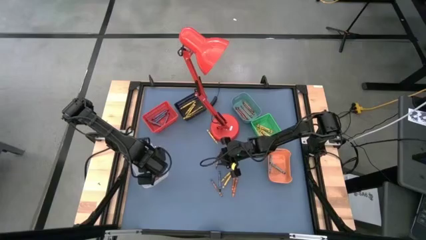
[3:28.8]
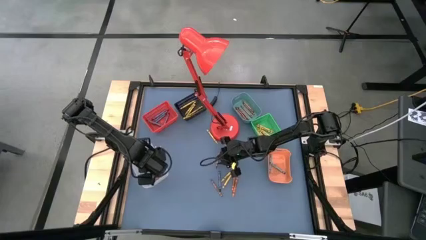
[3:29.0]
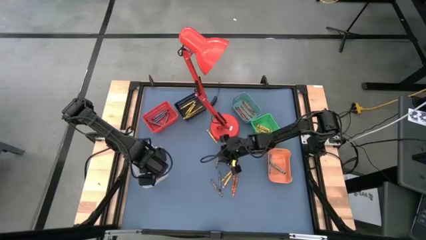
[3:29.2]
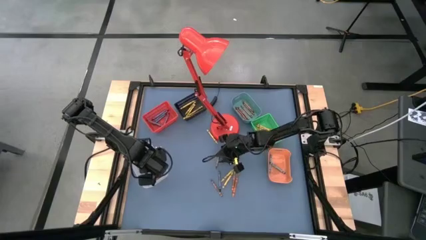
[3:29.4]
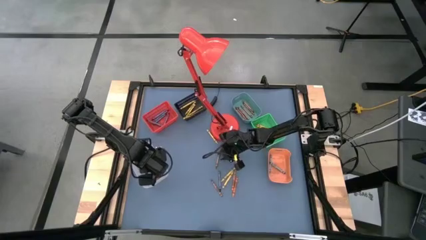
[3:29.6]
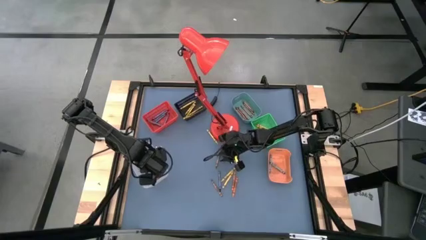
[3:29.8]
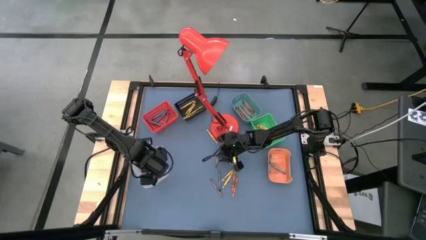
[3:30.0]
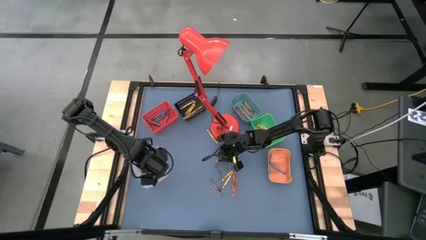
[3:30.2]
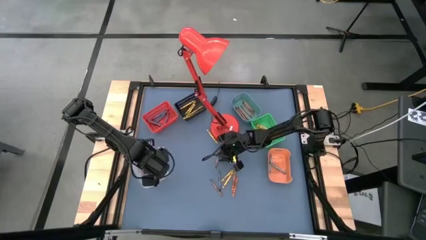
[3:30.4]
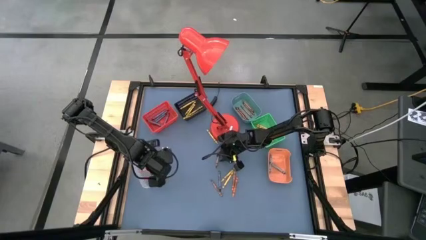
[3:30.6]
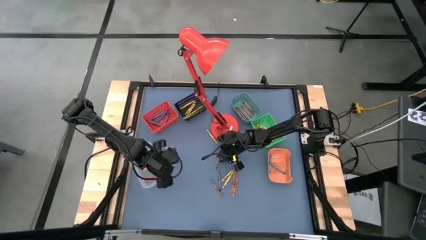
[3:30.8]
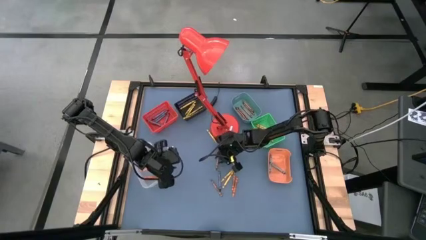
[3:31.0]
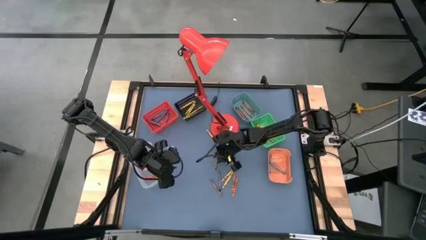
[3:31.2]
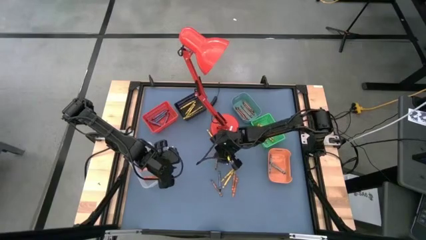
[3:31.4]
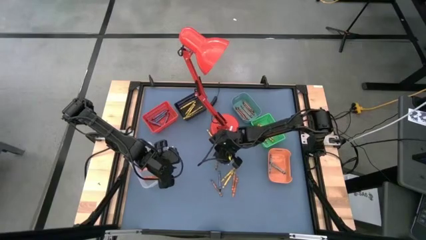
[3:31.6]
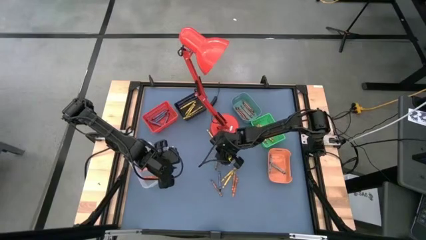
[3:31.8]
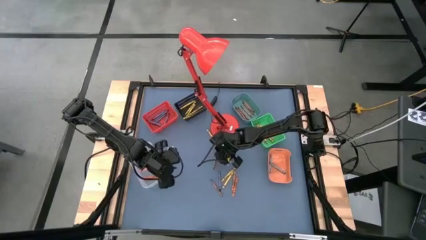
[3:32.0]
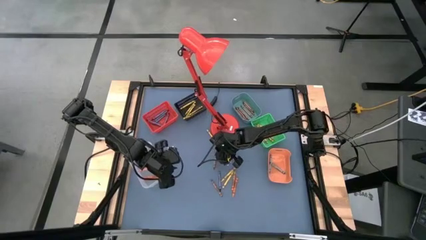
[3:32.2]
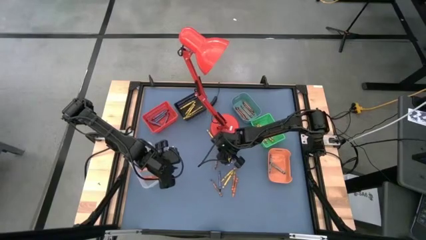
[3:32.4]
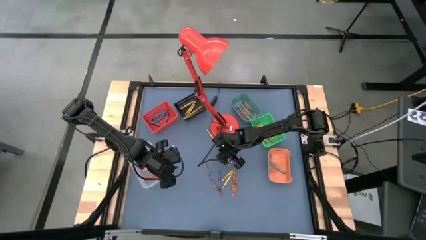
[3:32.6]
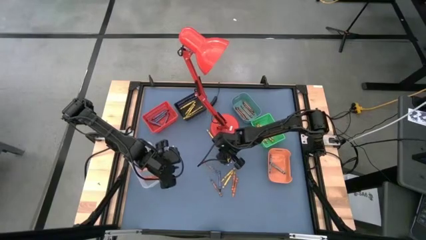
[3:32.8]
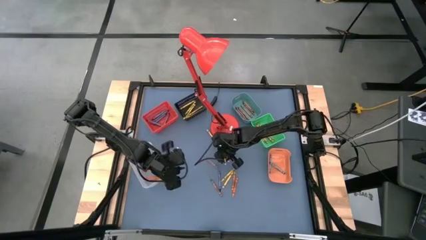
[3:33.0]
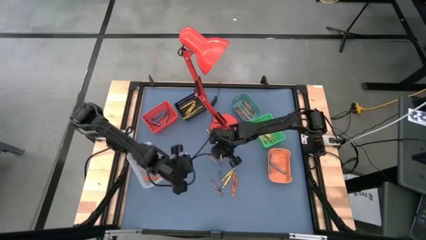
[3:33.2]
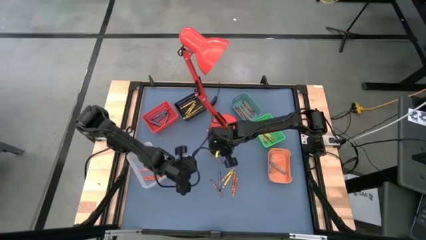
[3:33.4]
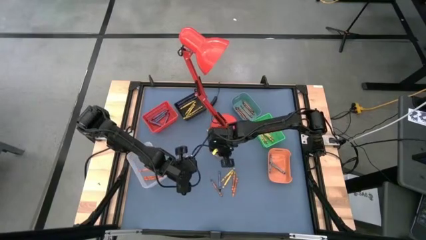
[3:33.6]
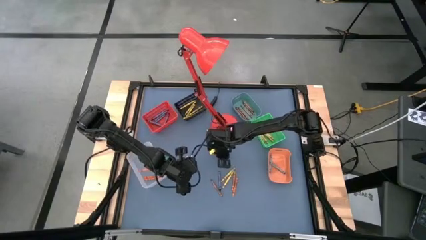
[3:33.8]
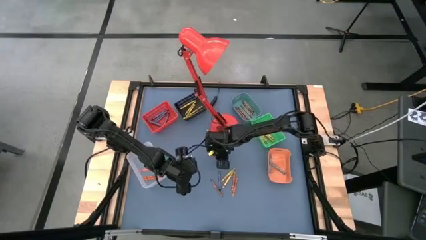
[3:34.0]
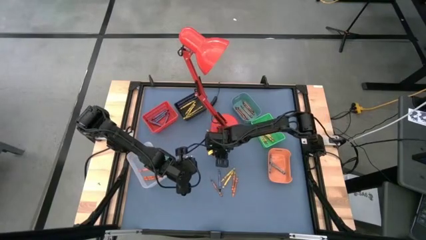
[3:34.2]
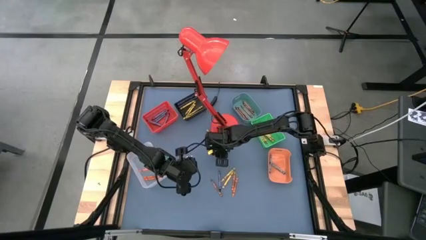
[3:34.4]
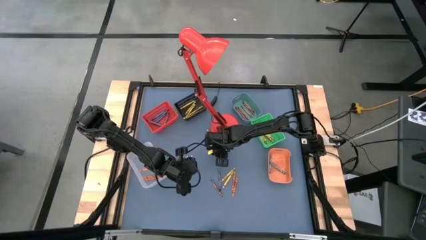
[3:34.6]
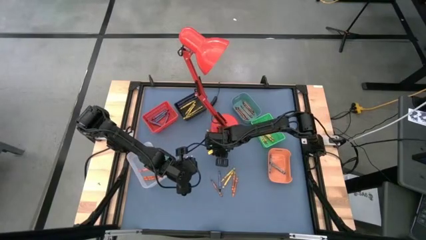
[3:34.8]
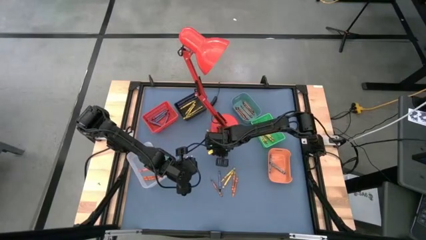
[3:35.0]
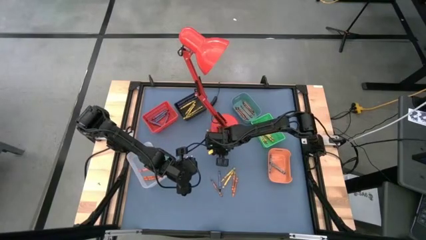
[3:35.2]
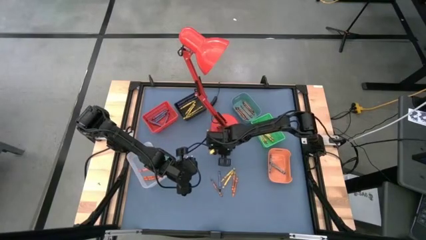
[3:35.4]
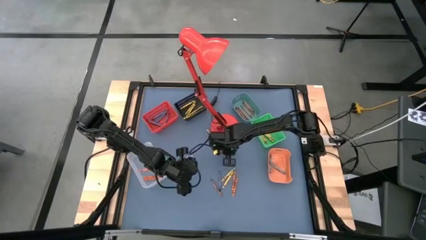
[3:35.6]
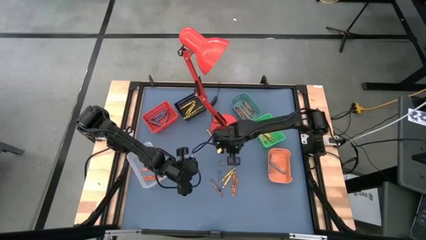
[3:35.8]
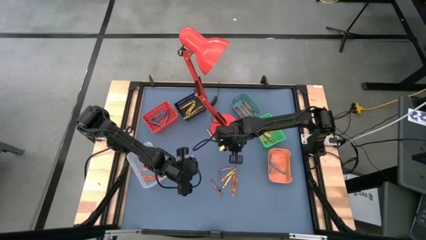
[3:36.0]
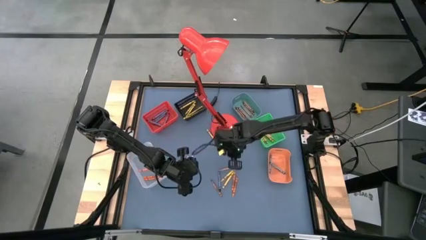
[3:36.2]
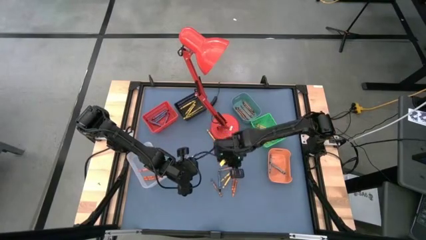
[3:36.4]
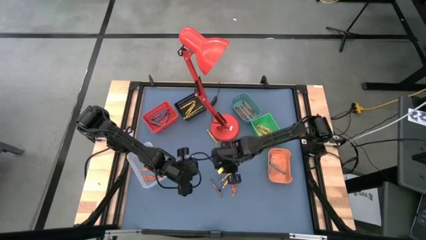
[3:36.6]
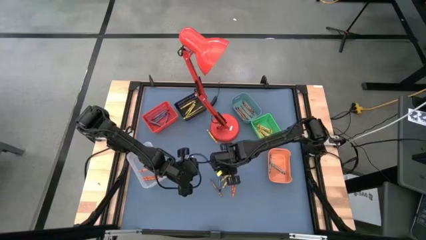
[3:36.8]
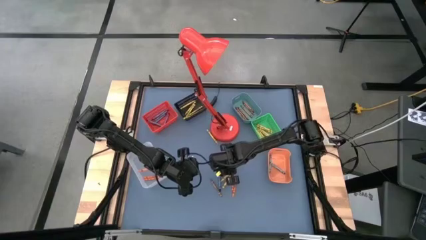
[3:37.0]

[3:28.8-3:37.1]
Task: Sort crayons
Put the brown crayon into the top right blue bin

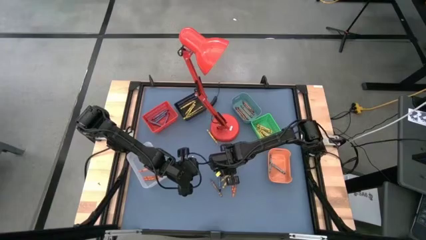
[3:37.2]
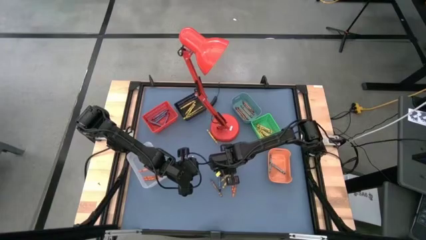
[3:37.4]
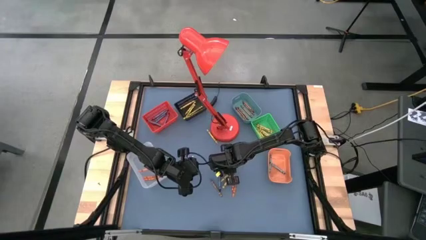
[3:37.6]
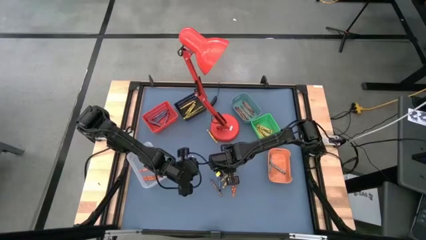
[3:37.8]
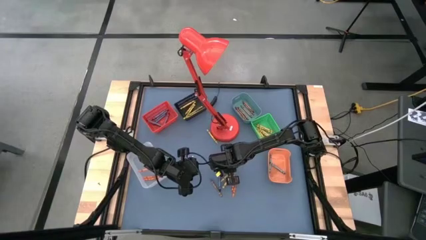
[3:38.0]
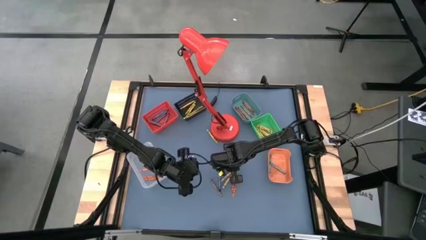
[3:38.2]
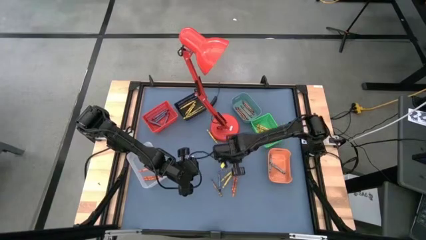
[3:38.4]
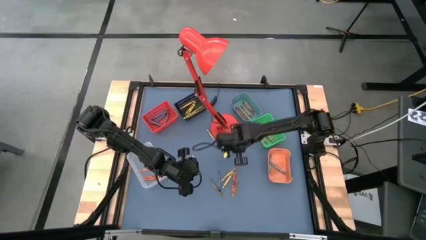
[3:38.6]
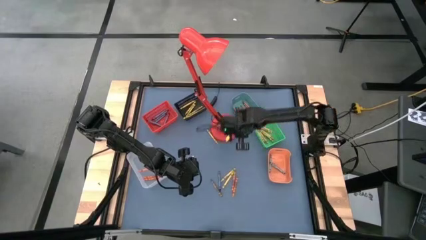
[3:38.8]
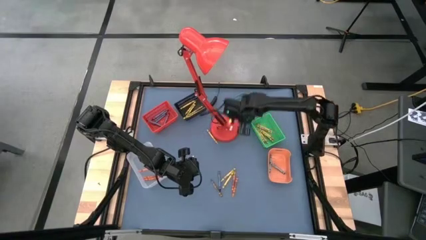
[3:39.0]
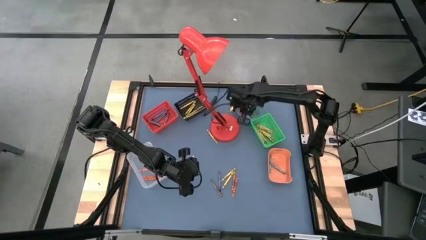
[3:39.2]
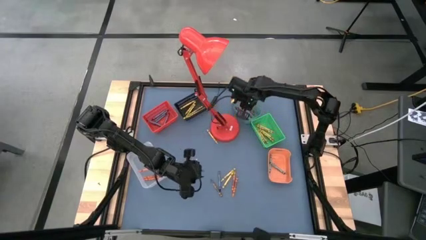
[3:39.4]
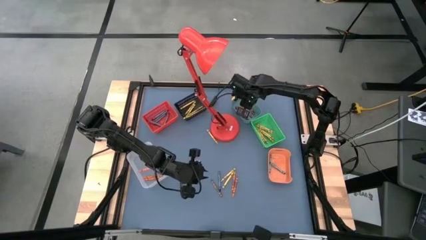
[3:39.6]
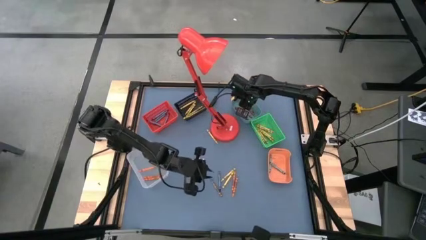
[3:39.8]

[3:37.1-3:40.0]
Put the brown crayon into the top right blue bin

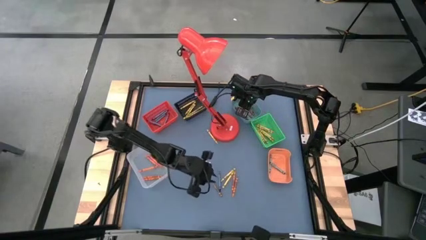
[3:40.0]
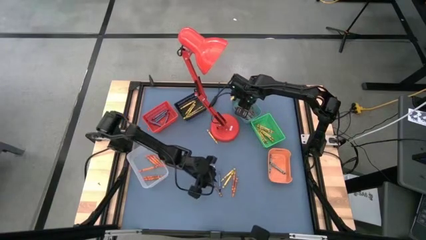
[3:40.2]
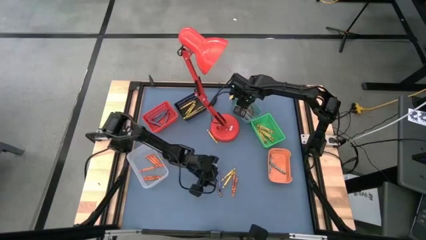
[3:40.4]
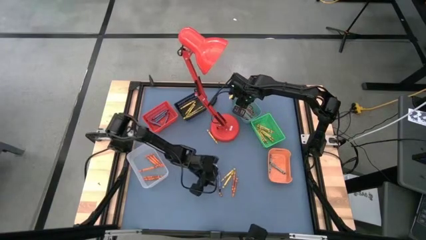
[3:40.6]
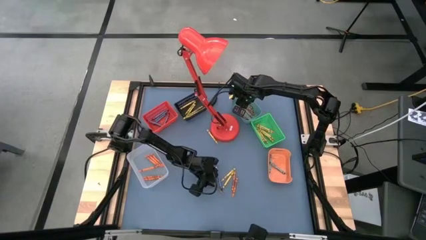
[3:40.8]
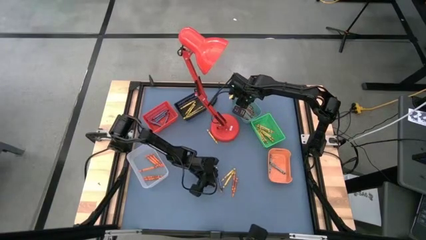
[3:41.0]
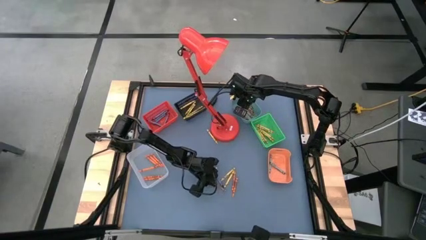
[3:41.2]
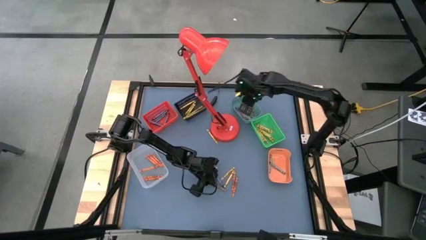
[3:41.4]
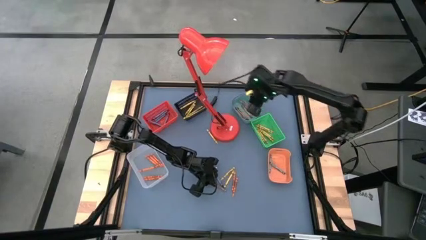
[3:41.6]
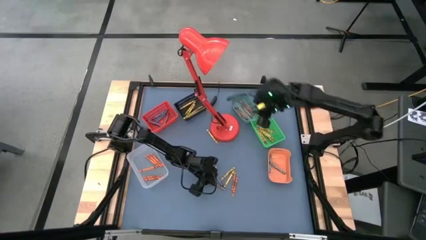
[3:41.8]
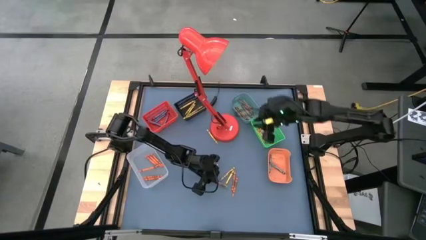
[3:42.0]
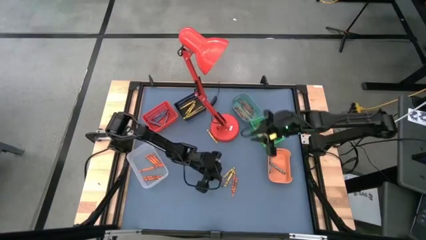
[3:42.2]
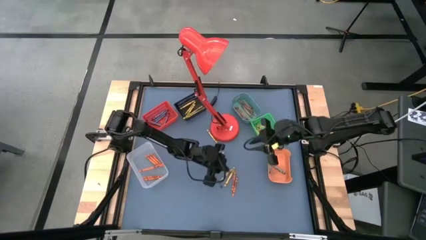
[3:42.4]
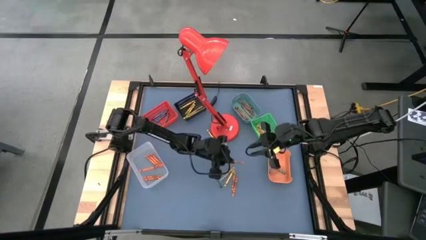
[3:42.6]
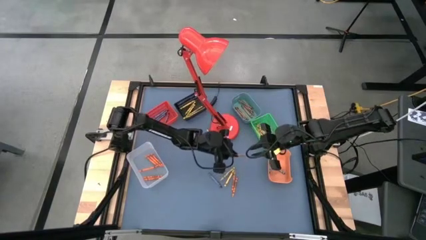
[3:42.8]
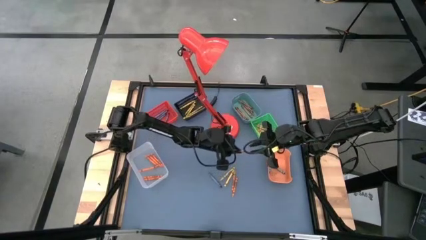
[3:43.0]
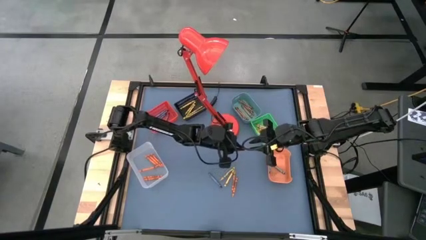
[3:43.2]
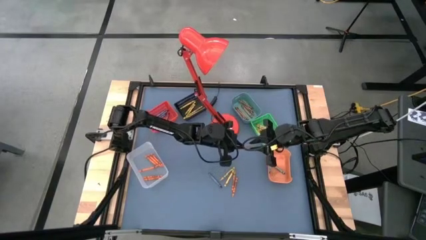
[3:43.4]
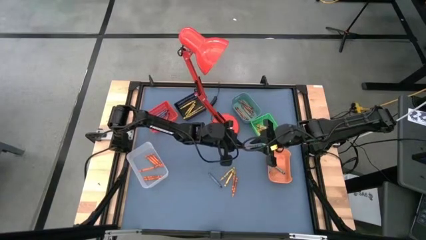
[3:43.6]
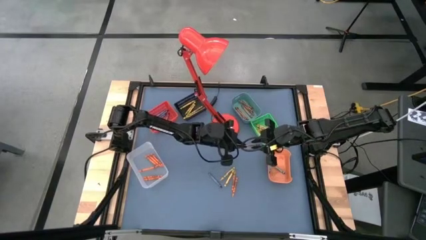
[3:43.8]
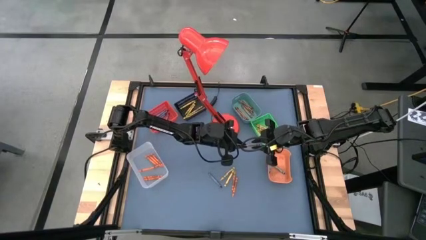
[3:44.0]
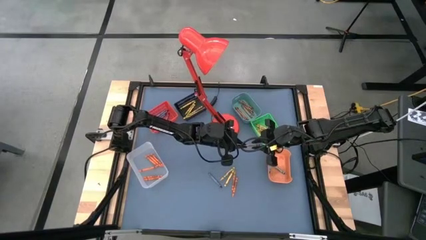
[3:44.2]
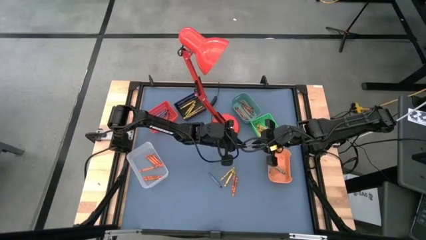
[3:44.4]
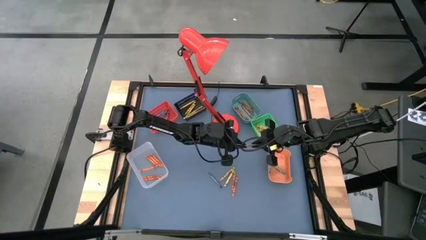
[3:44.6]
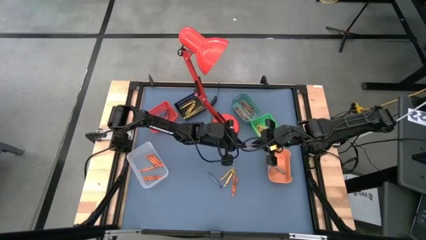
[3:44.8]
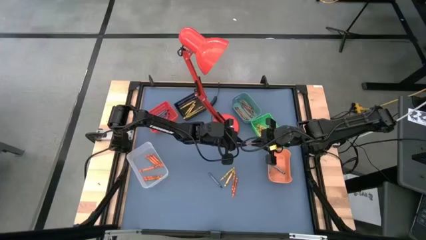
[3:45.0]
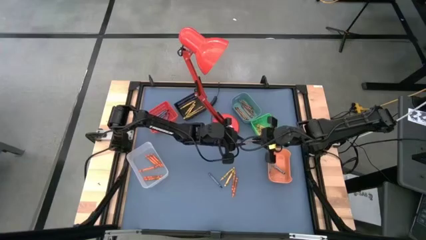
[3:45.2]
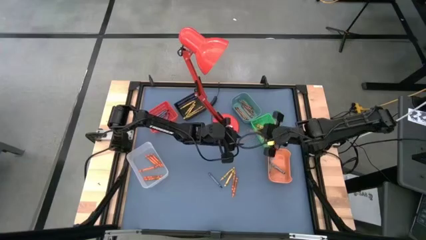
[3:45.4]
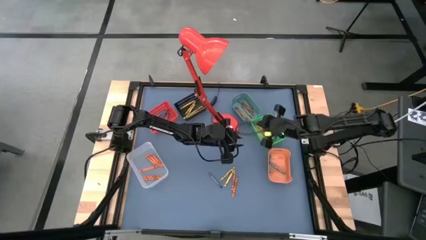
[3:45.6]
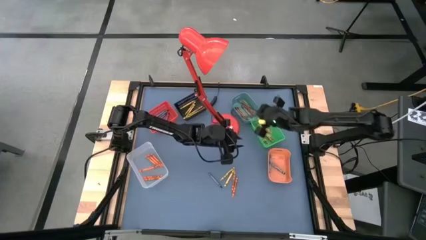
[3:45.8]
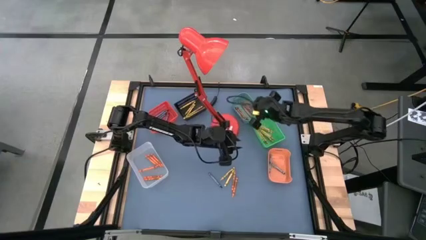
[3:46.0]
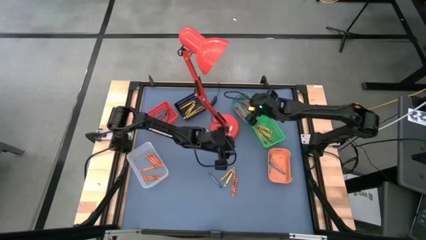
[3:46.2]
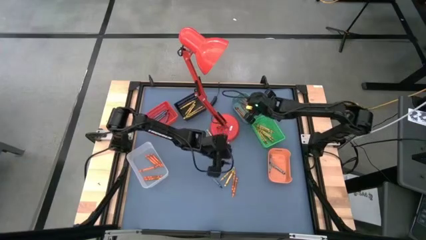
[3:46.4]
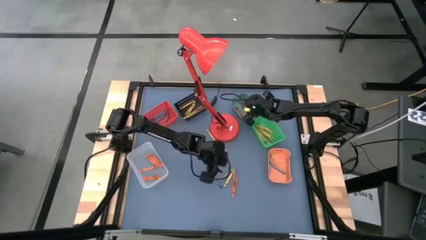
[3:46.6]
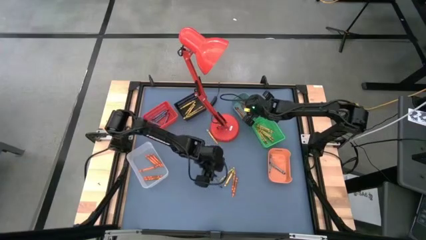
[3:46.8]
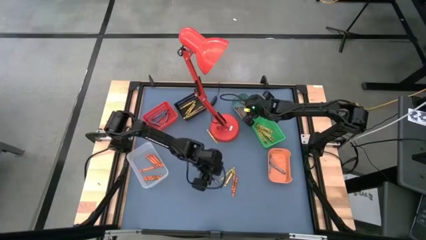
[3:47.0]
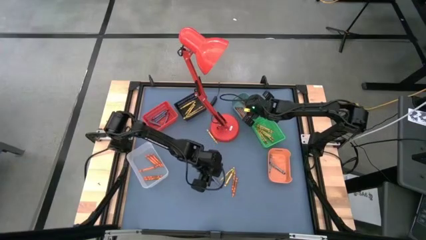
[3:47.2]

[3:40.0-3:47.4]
Put the brown crayon into the top right blue bin
